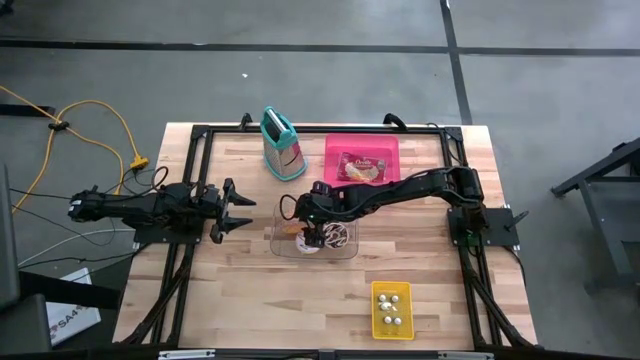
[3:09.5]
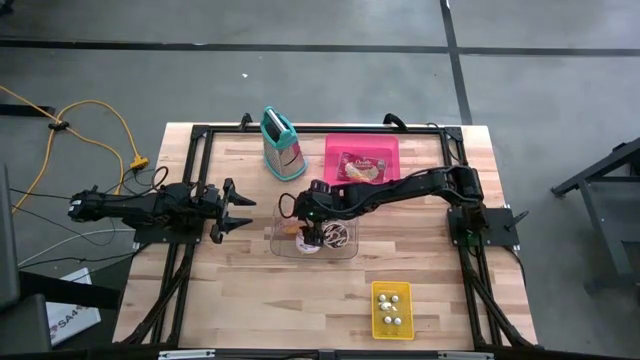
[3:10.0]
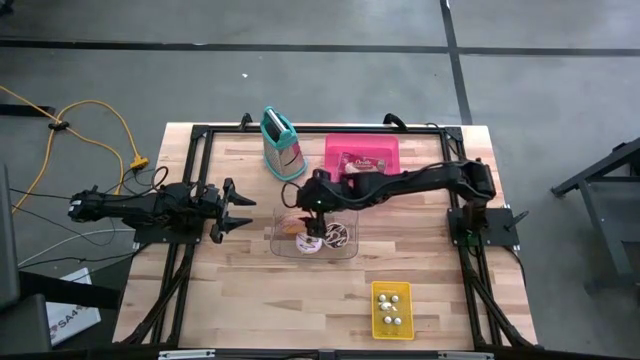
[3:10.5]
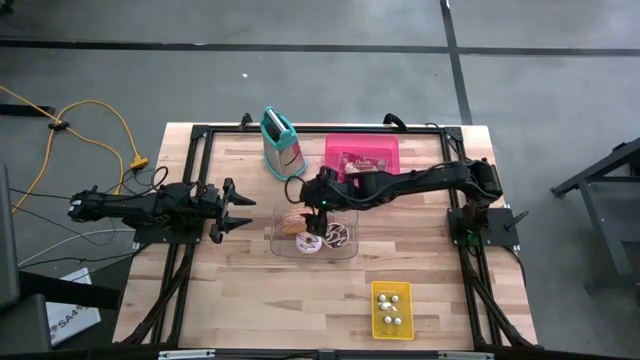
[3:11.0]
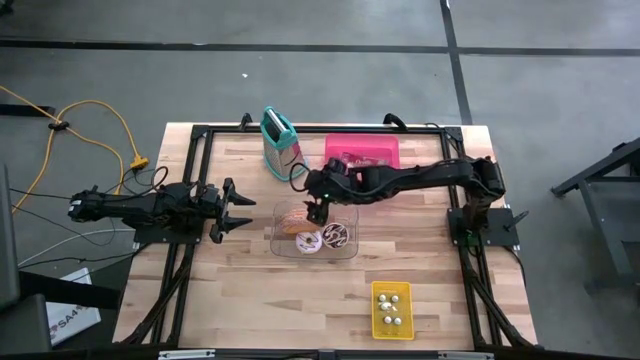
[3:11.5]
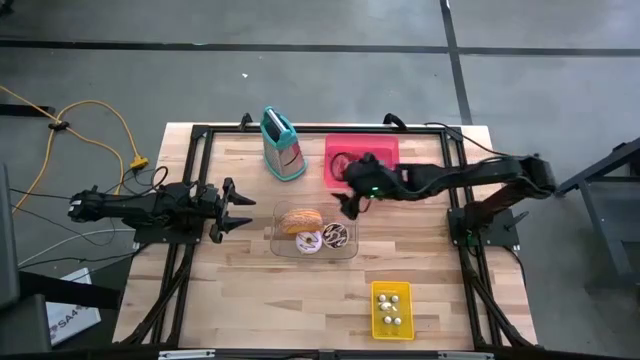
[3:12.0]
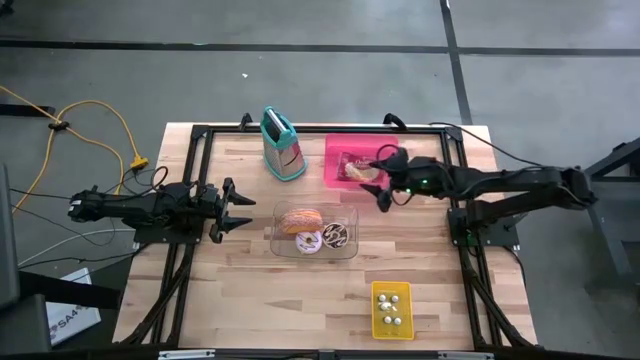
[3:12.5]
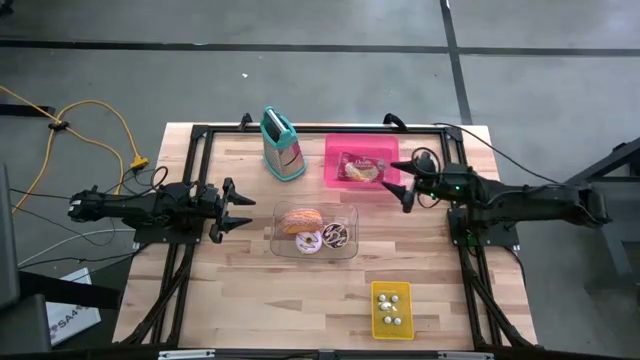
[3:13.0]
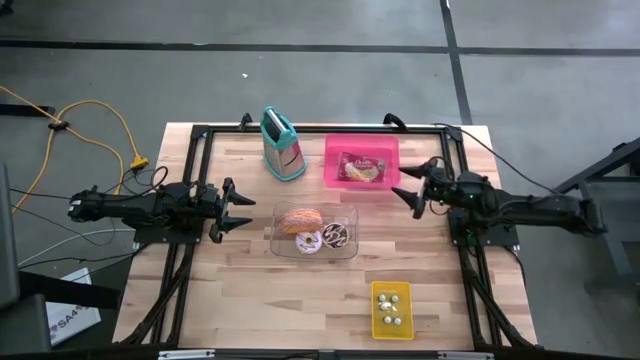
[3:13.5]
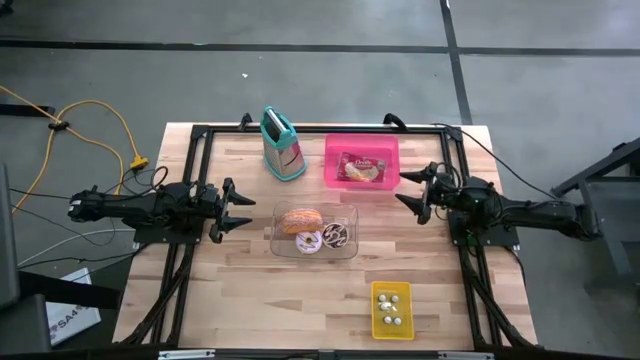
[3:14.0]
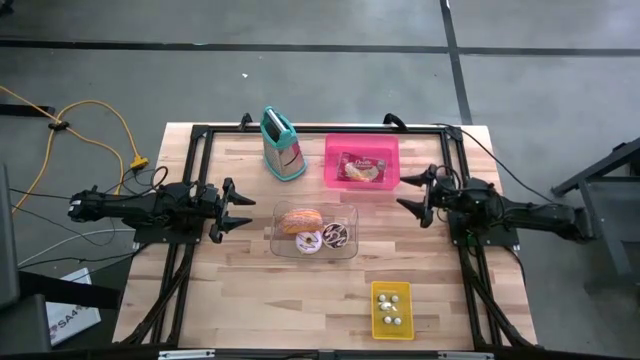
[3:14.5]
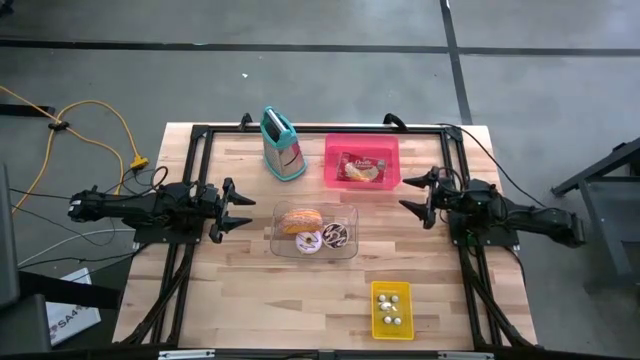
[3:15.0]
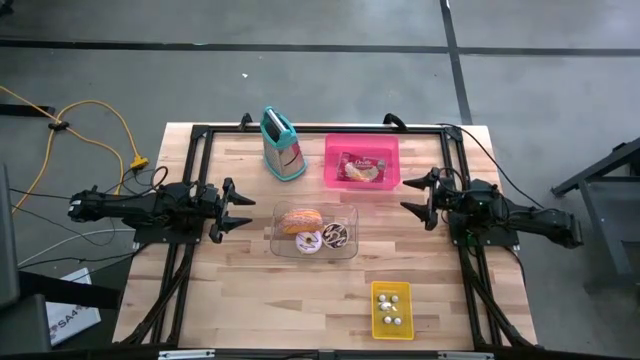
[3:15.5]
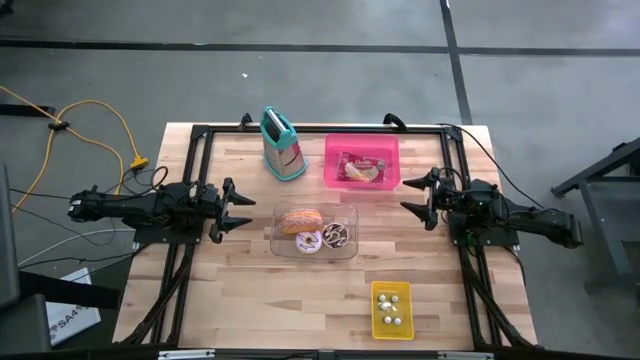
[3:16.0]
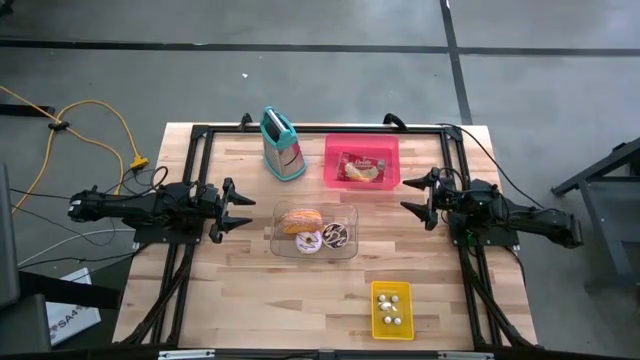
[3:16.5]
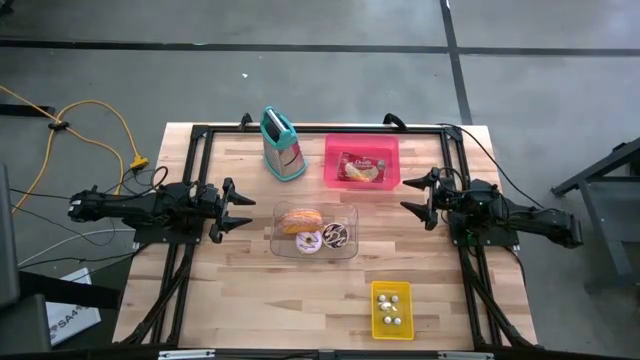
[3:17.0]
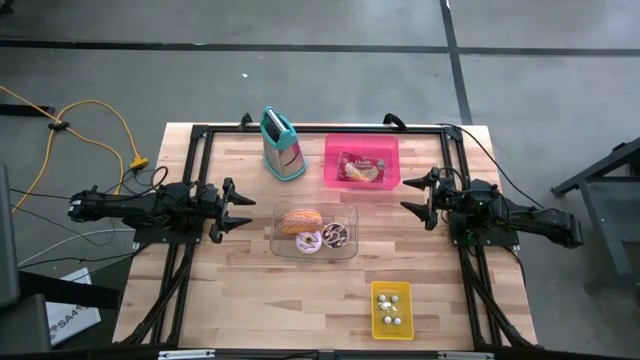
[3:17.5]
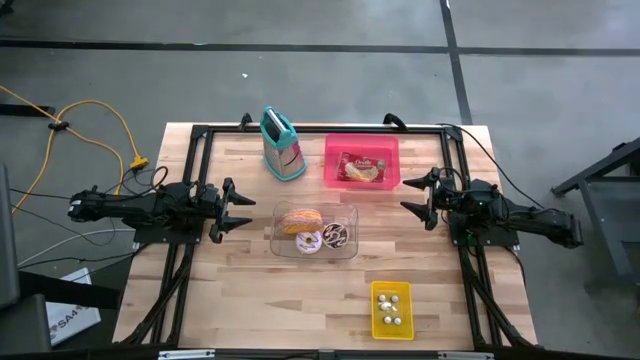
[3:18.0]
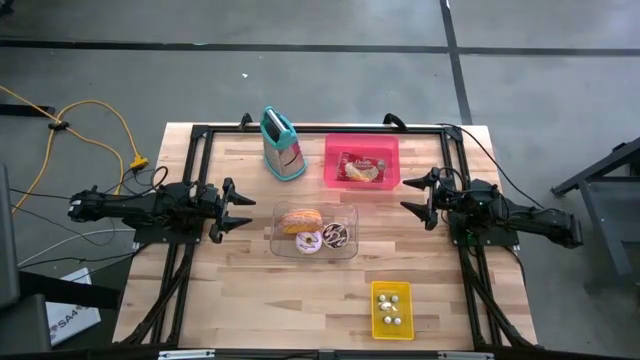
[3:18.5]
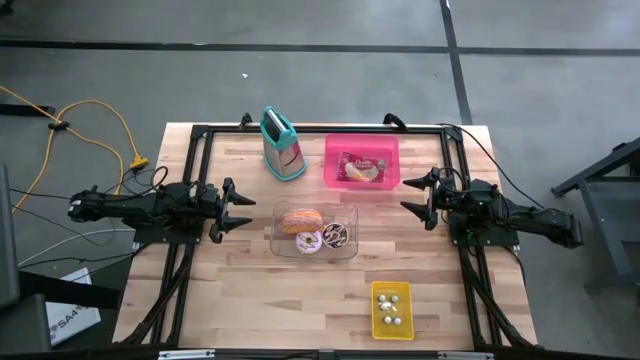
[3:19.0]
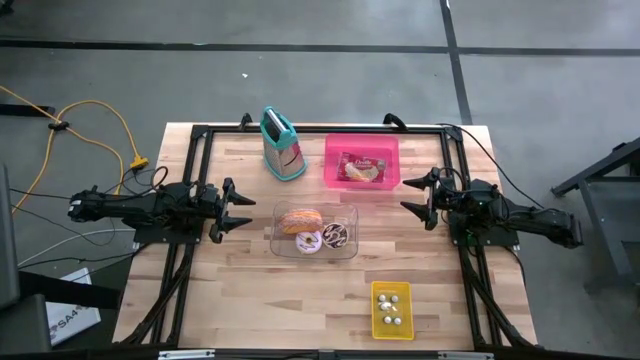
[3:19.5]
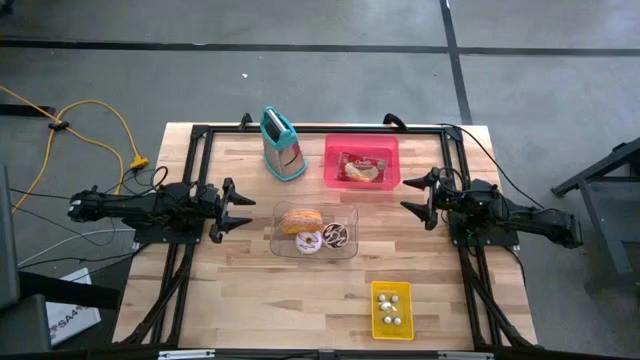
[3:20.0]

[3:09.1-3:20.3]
Return to Home Position
